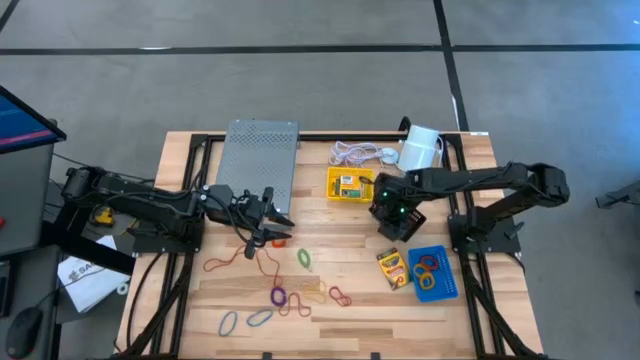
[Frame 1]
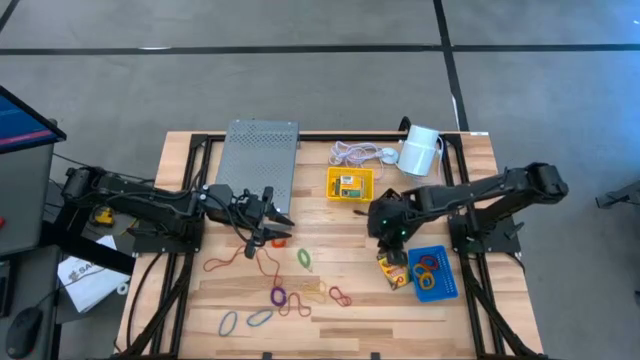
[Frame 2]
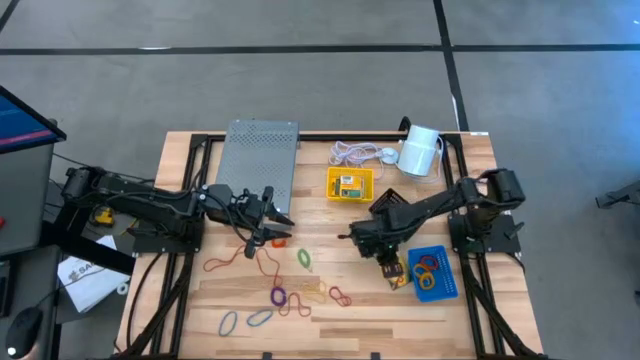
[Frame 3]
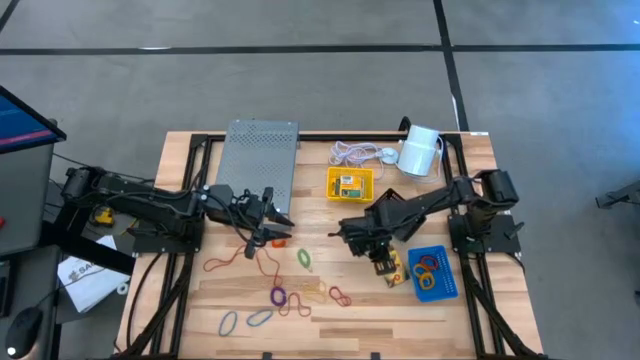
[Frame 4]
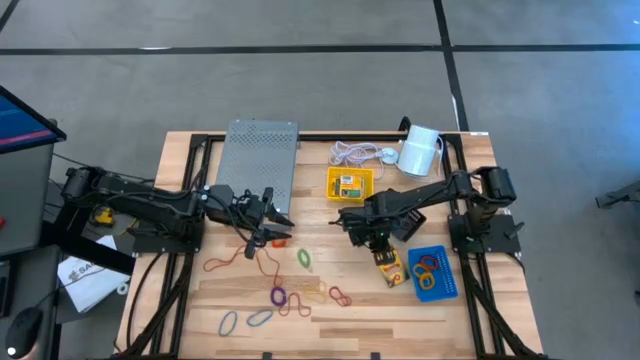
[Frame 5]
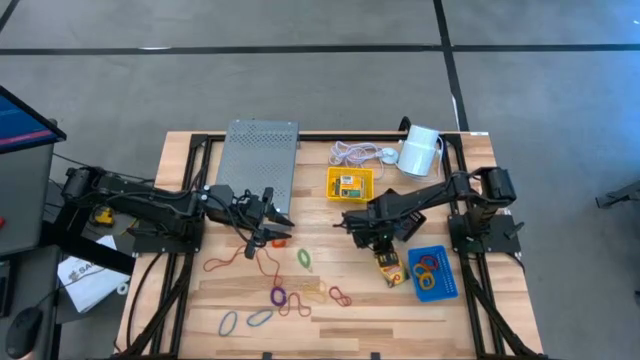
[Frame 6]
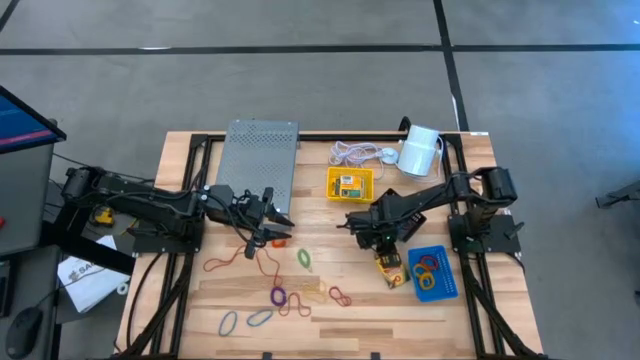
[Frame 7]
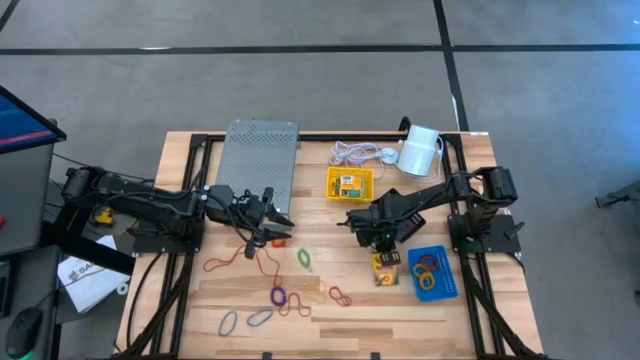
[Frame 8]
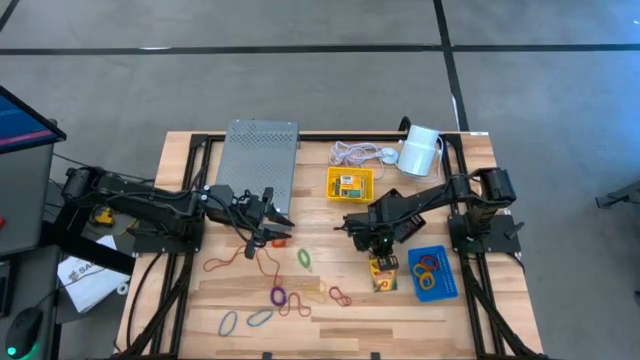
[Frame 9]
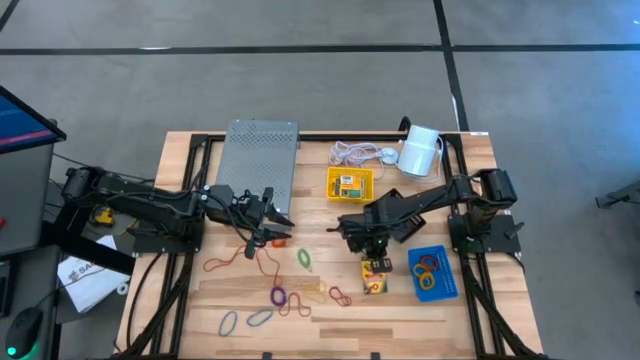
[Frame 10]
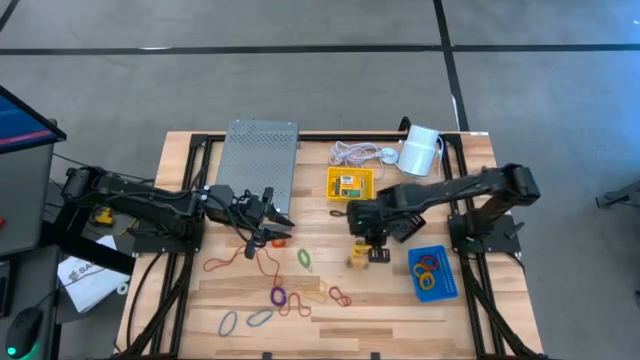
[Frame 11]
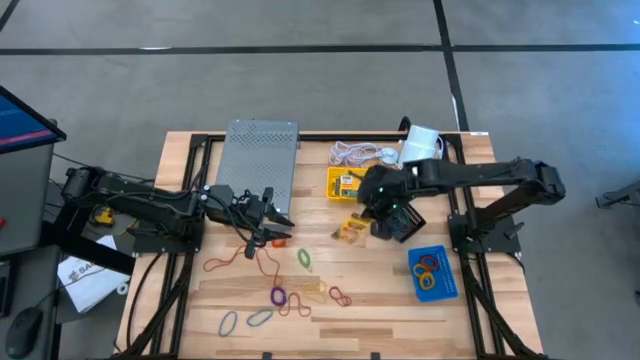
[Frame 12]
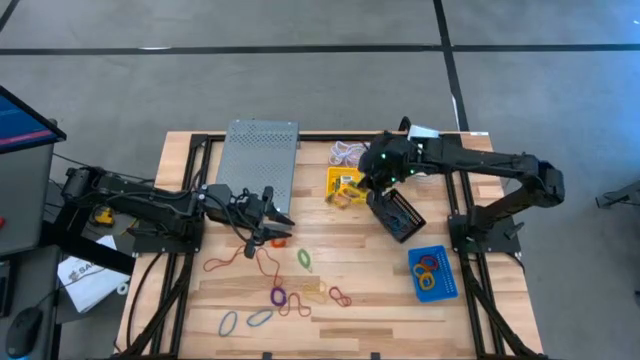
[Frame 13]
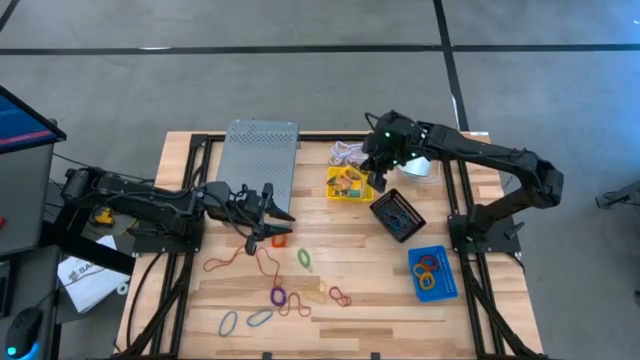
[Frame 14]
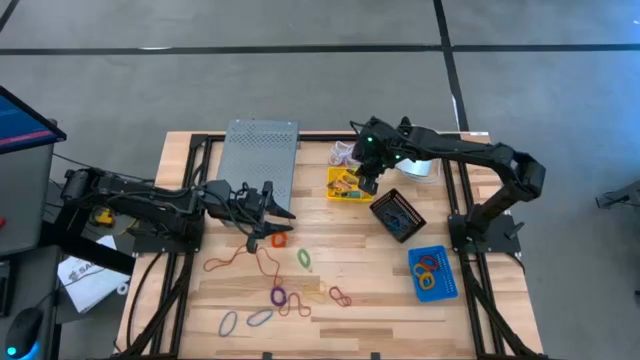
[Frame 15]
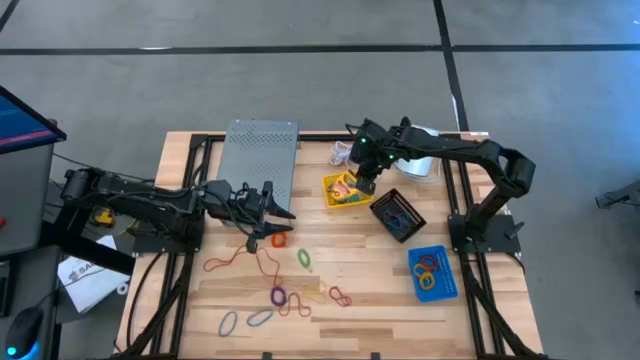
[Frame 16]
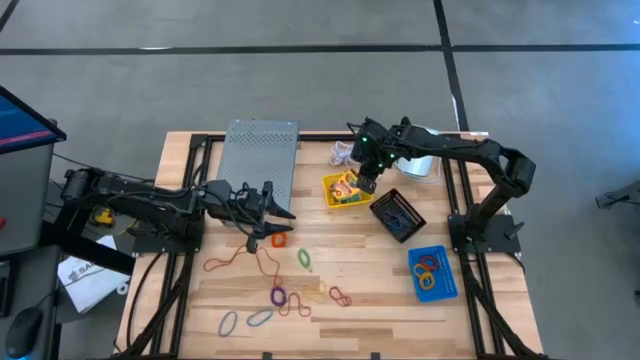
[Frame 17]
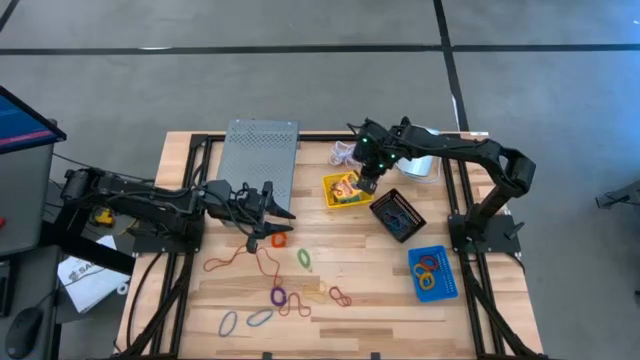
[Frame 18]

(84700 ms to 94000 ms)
Task: Pick & Place Office Desk Supplies
Put the crayon box into the yellow bin

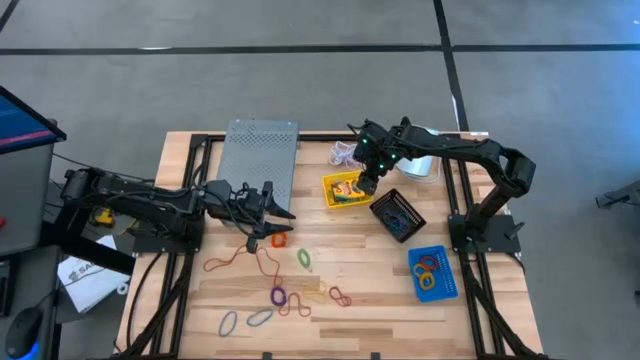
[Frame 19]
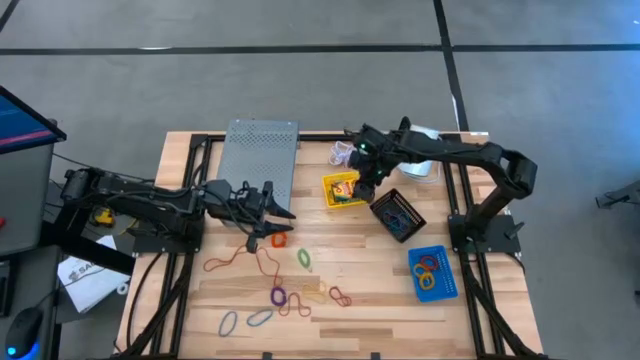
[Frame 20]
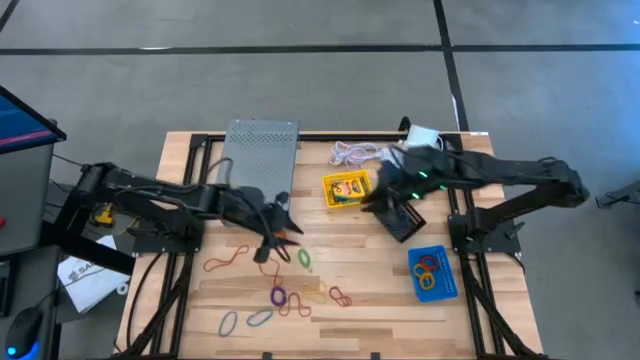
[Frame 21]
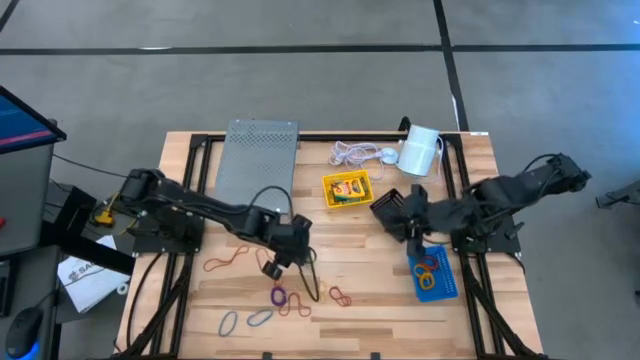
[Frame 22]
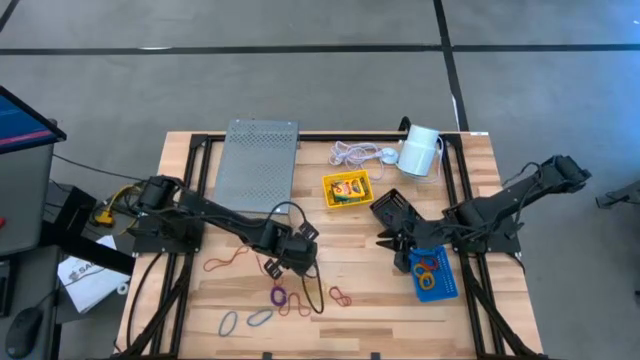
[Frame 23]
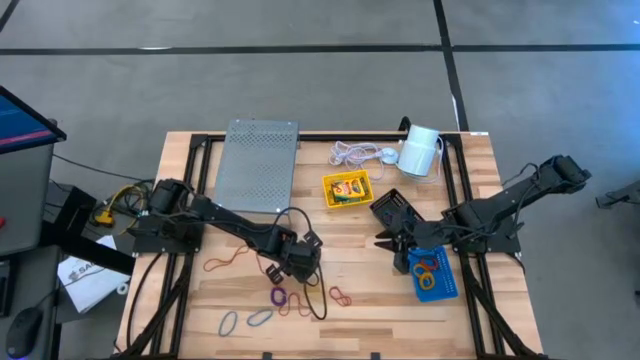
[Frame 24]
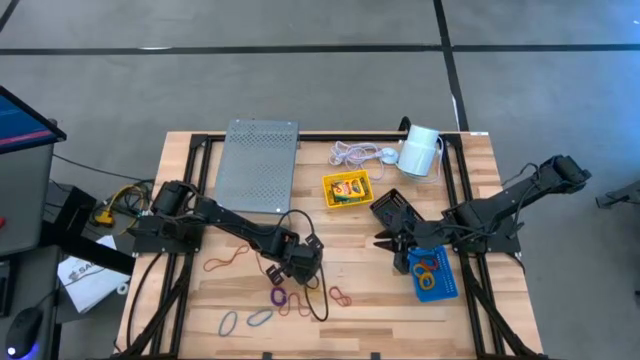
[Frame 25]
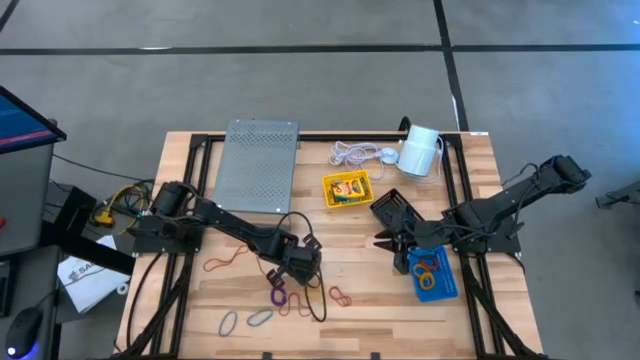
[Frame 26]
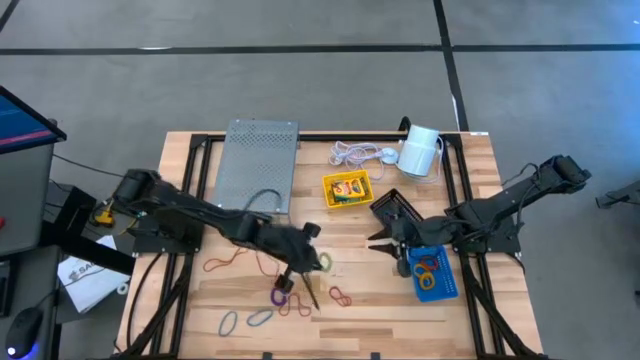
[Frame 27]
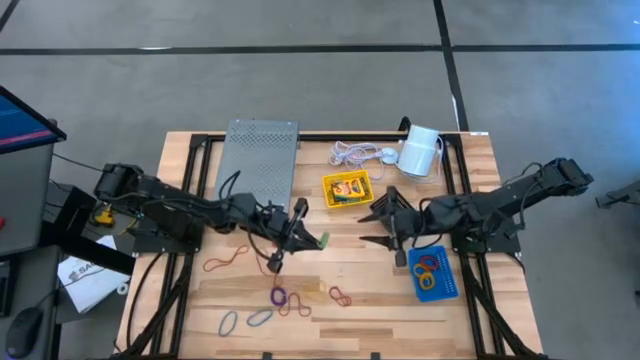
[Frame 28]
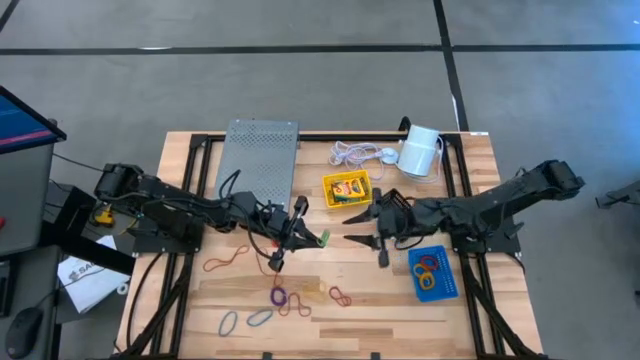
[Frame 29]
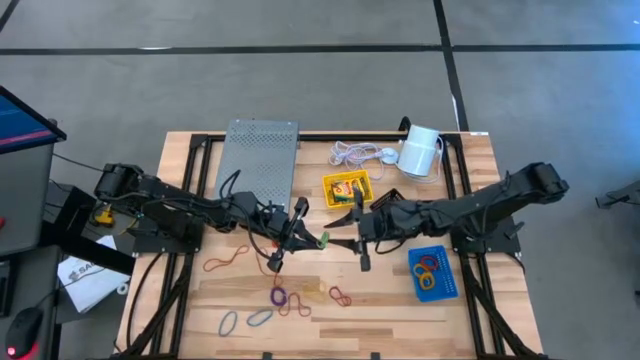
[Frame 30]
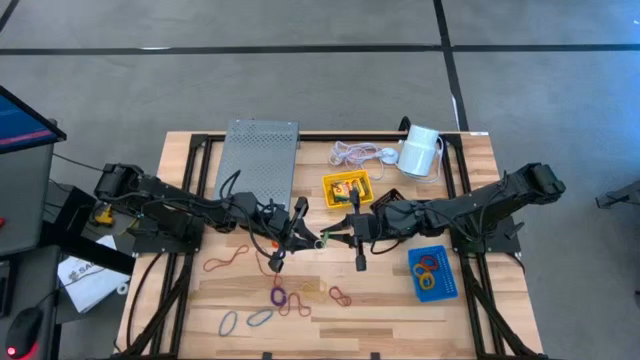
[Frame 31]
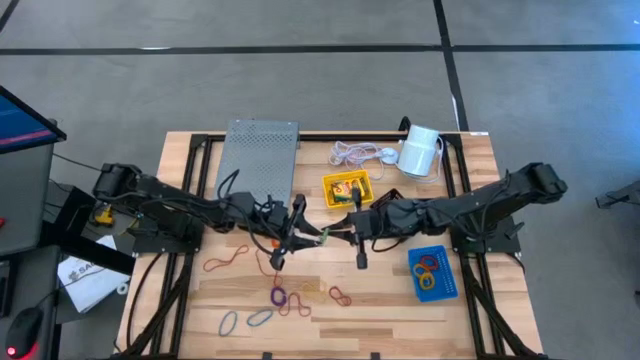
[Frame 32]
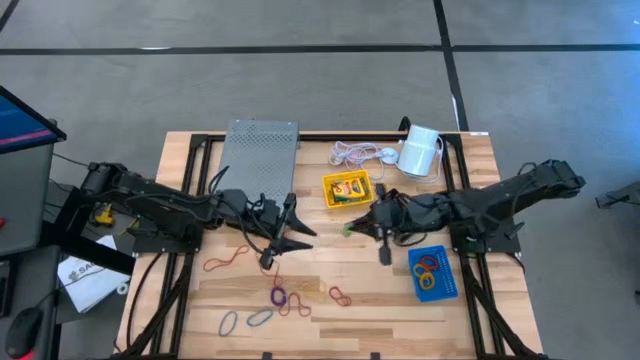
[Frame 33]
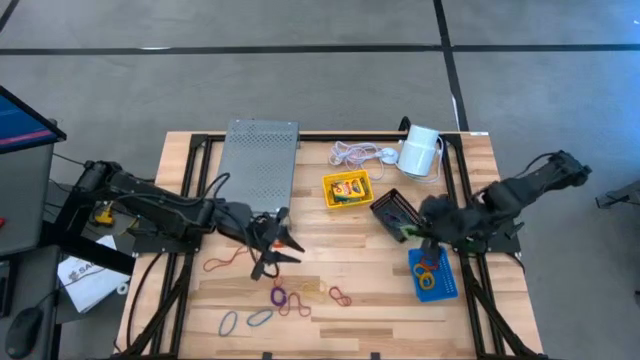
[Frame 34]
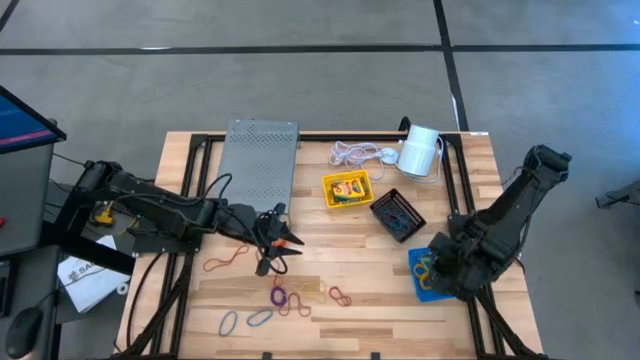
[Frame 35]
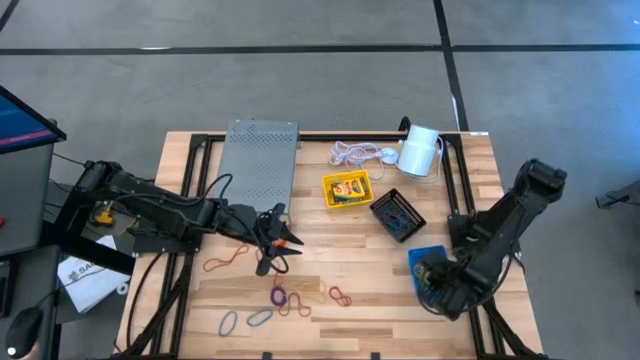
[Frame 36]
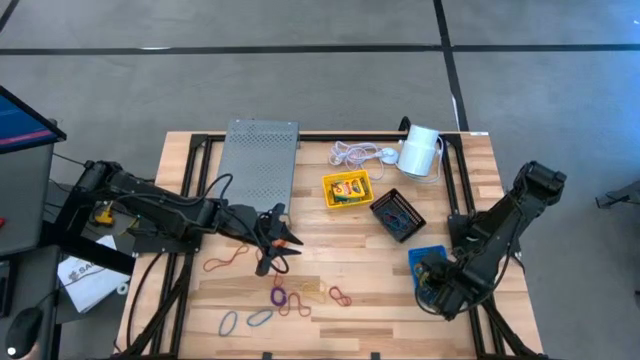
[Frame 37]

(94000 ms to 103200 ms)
Put the green spring keychain into the blue bin
